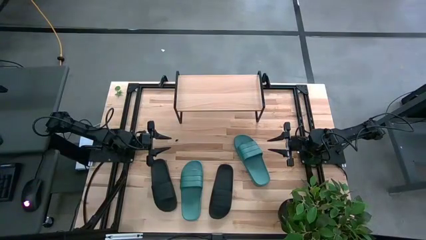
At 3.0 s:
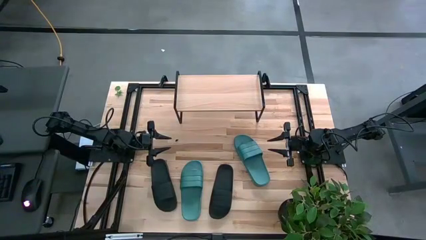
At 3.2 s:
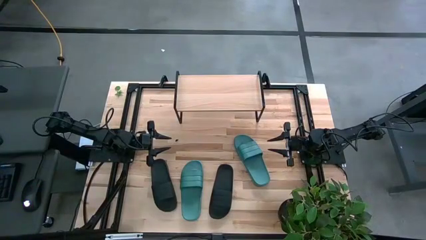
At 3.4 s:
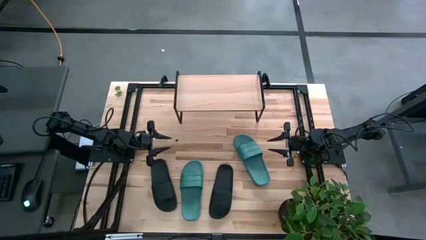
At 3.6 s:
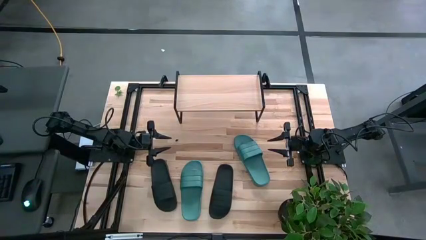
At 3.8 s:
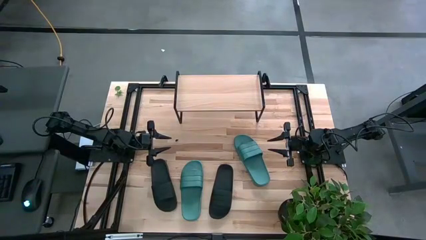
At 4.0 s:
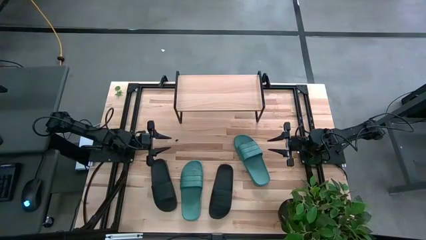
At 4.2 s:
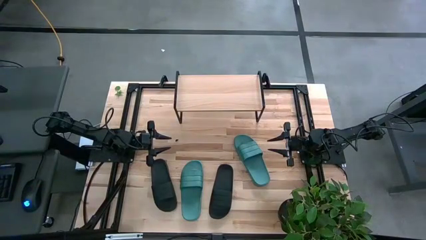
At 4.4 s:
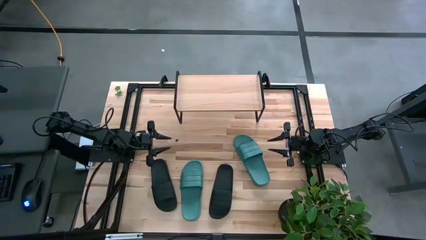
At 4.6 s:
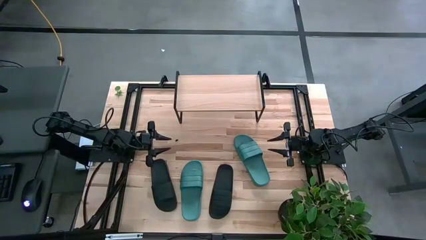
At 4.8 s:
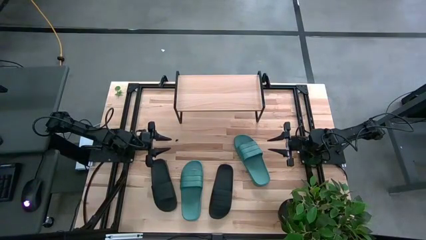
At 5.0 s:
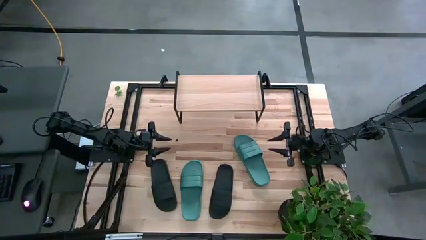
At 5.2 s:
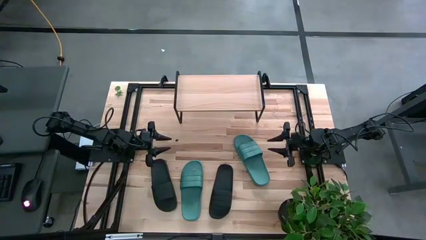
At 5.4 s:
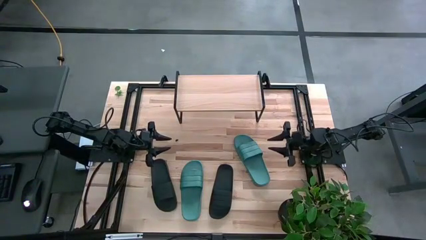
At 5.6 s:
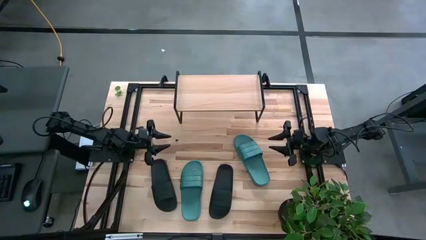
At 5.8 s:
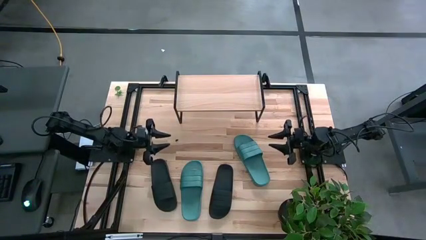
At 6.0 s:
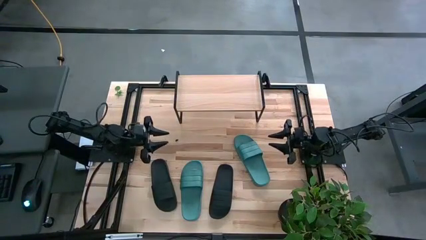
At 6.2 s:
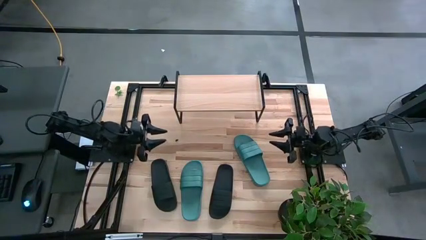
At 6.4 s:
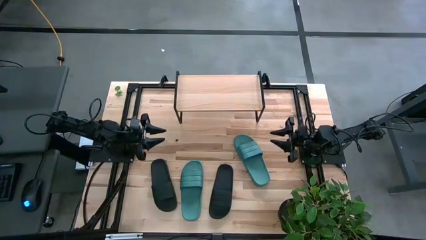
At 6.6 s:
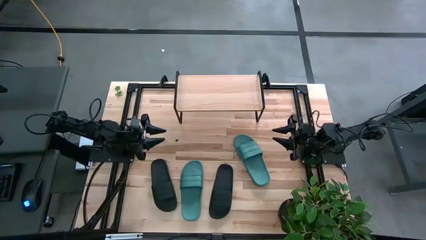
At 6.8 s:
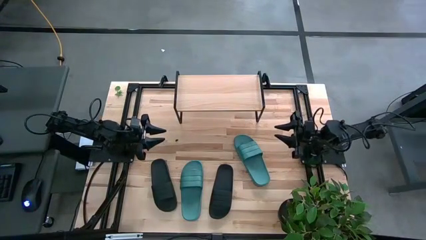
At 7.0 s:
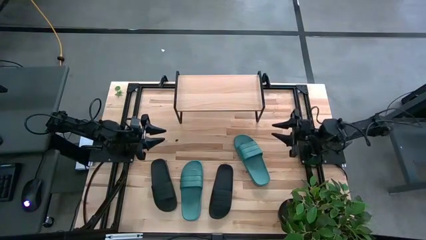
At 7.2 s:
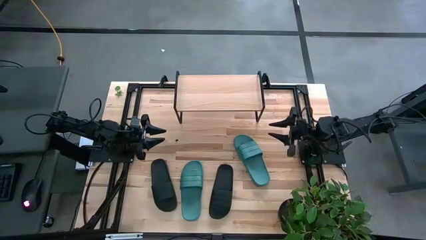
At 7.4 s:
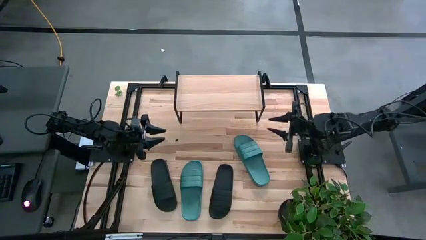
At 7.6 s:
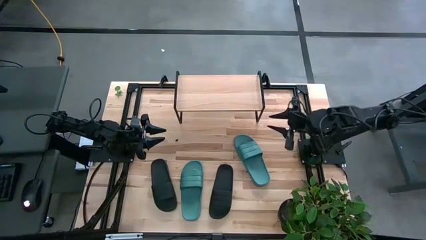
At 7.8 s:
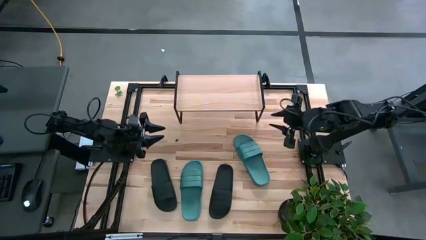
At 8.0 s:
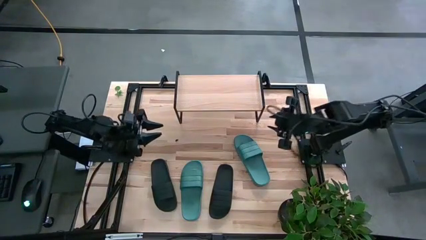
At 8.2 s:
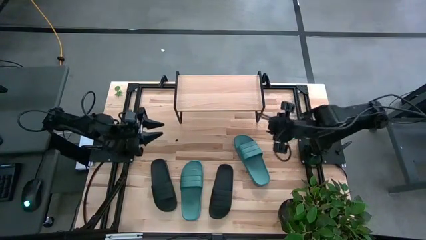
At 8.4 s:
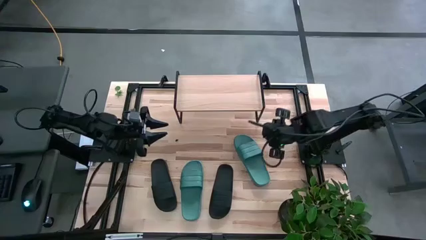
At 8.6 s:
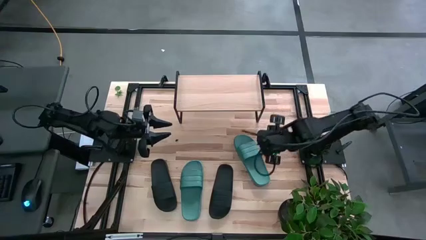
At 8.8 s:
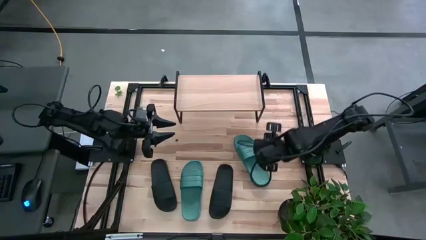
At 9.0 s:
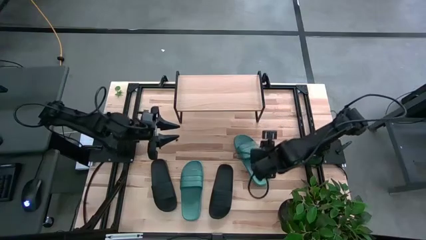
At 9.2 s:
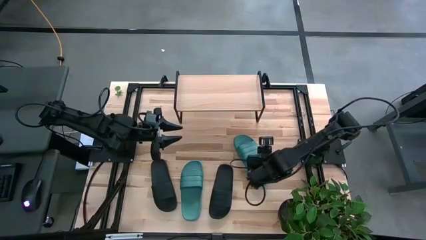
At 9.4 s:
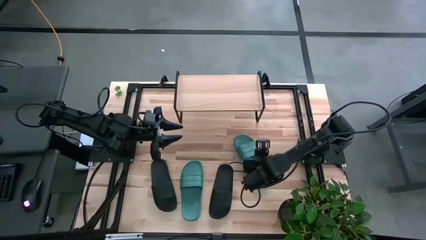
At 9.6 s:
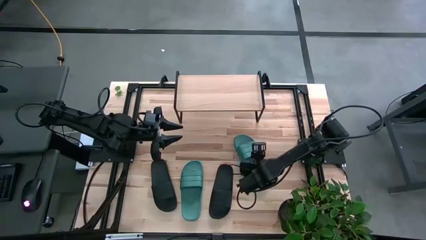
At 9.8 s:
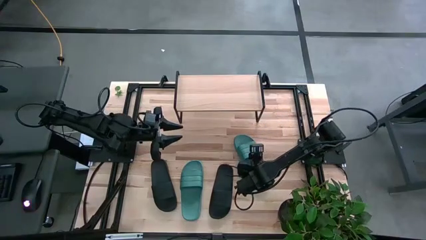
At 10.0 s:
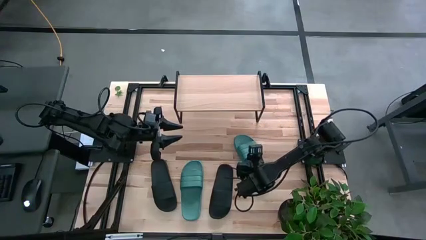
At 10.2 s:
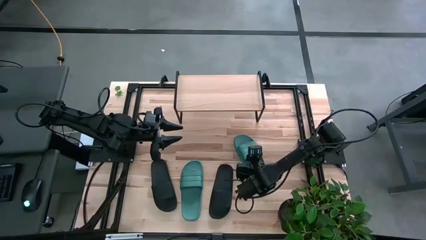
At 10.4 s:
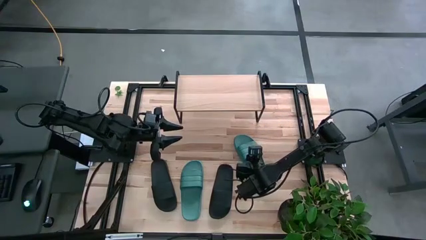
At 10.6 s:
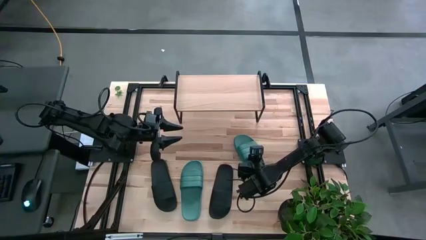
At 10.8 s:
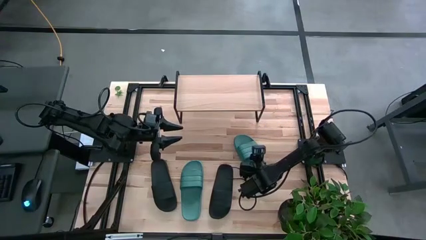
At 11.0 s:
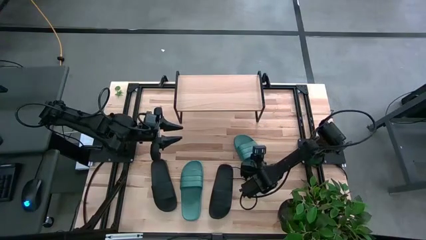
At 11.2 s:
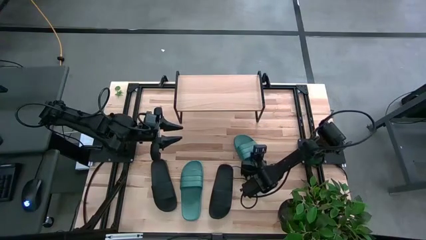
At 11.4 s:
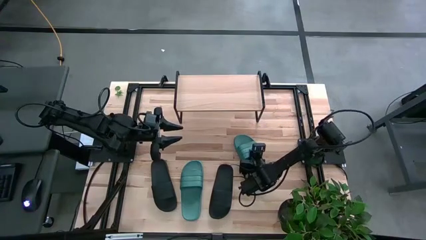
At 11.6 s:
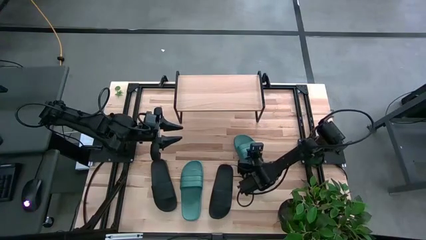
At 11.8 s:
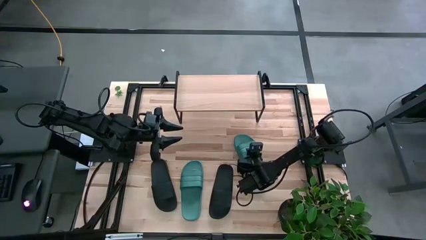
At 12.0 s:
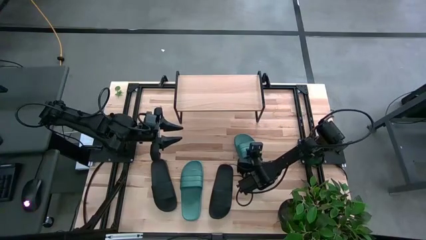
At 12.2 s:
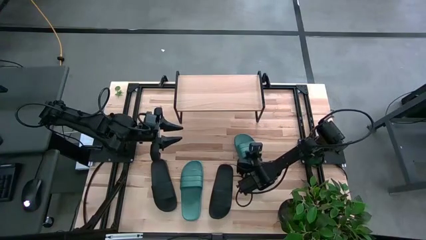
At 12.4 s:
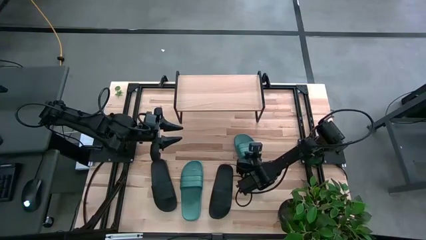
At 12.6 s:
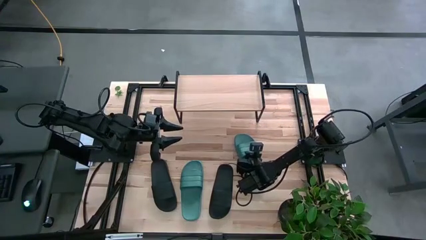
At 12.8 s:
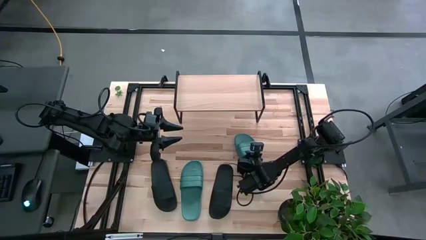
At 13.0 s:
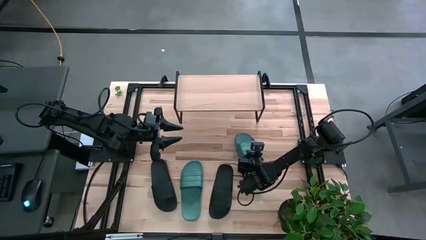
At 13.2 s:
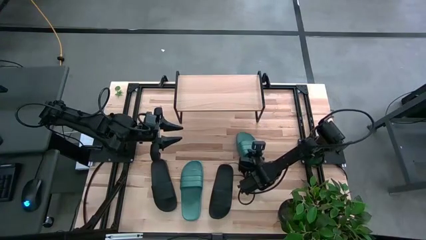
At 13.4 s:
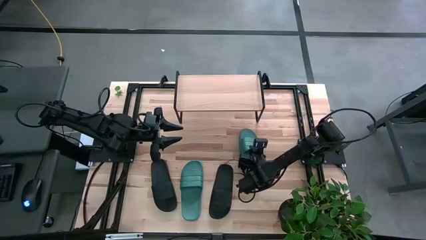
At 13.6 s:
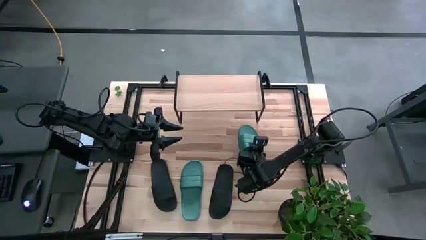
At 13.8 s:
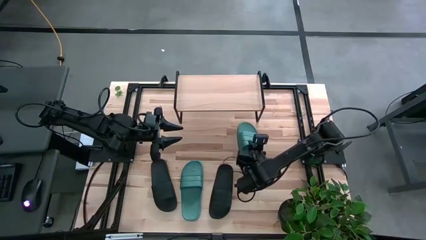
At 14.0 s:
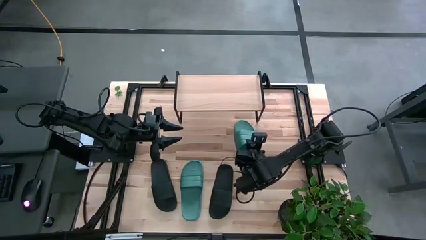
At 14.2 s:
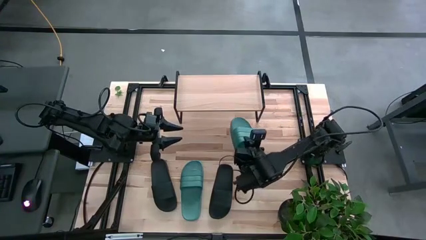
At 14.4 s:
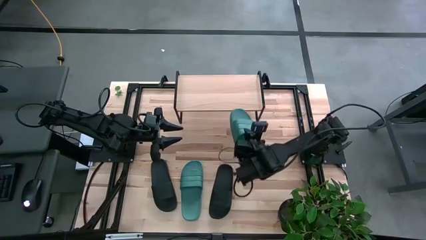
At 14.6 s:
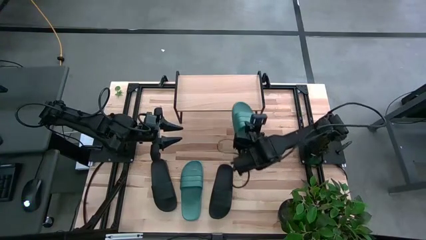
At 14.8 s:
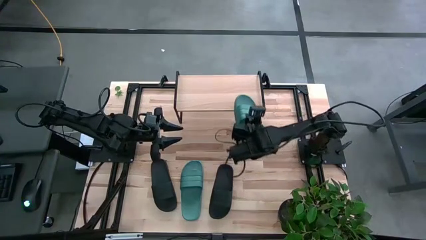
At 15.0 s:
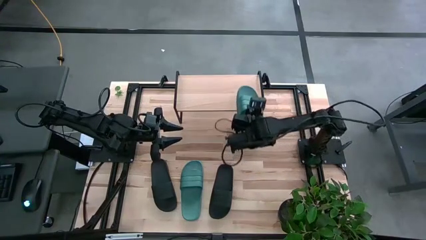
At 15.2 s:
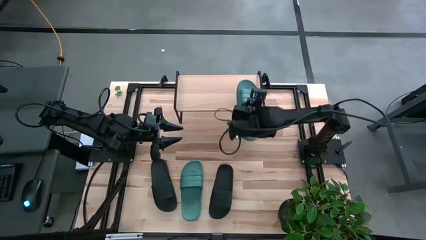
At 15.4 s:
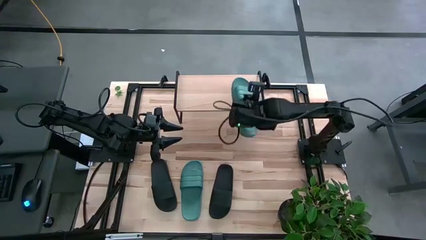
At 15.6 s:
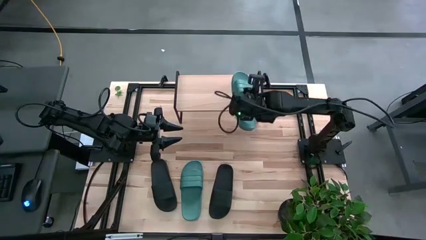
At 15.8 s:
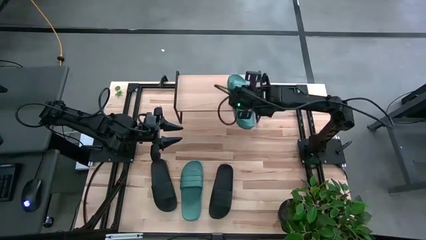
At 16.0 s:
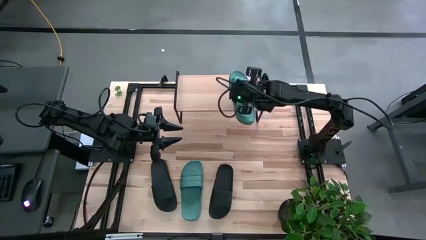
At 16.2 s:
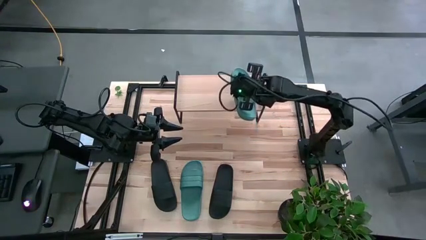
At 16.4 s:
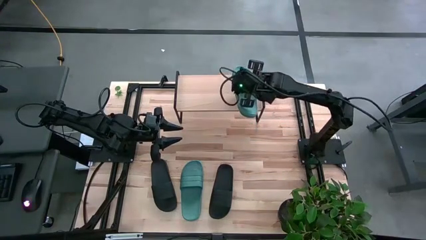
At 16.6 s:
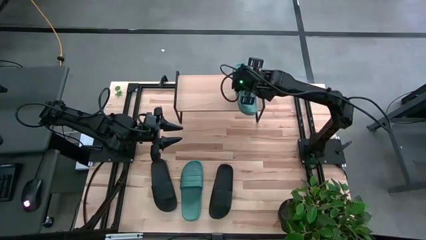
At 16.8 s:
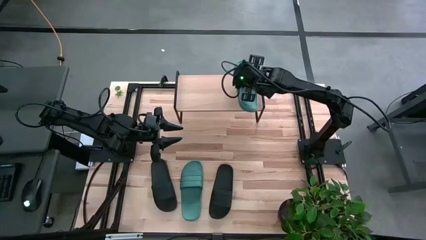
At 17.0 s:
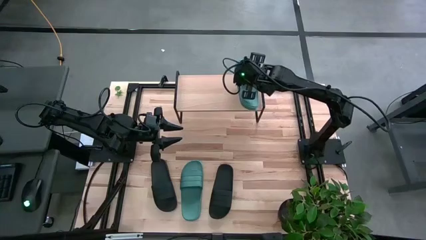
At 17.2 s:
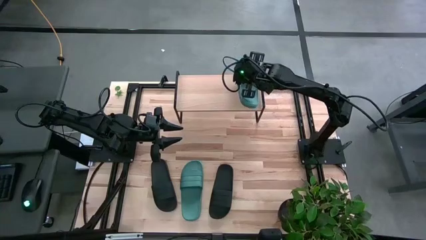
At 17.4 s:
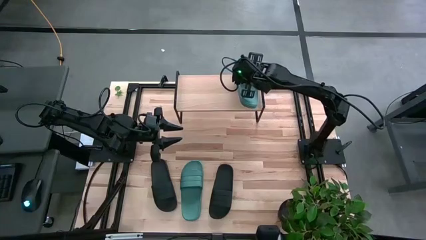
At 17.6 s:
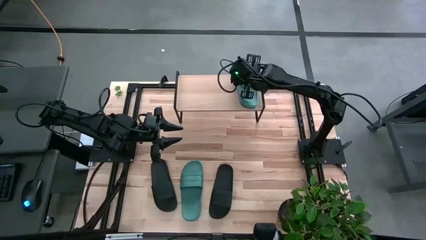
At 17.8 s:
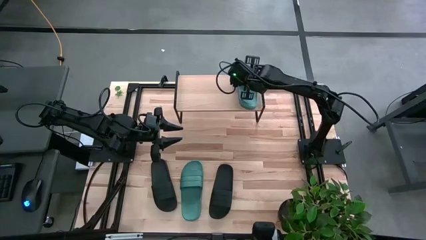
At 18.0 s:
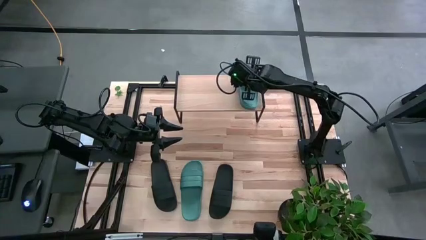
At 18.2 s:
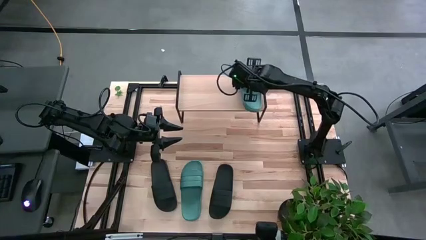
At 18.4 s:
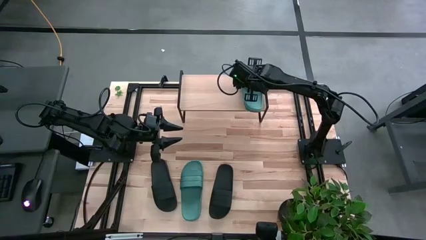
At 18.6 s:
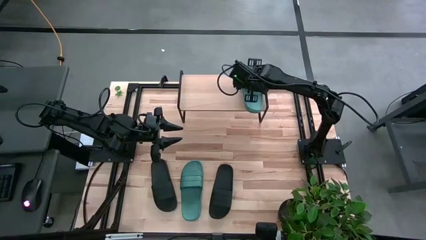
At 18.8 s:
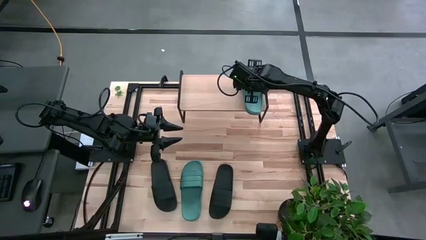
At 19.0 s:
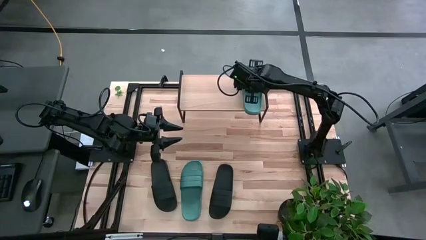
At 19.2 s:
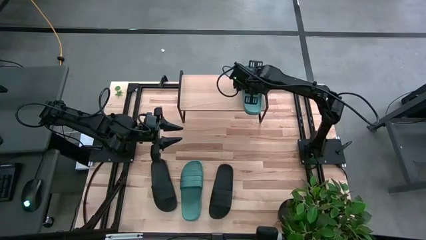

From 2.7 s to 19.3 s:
Task: Pick and place slides into the shelf
Put the right green slide on the shelf
